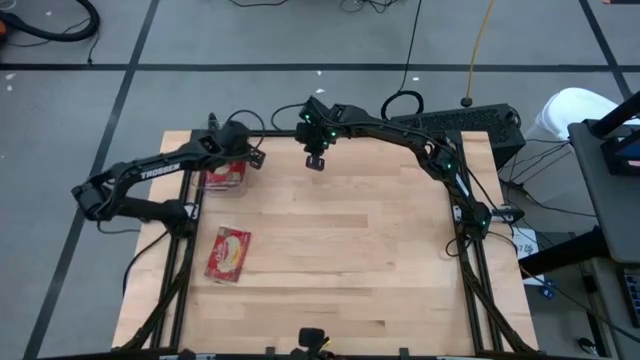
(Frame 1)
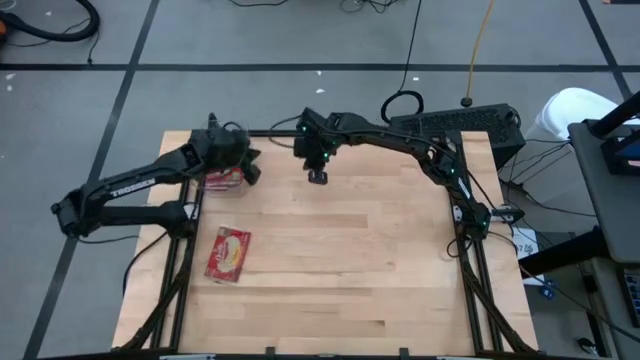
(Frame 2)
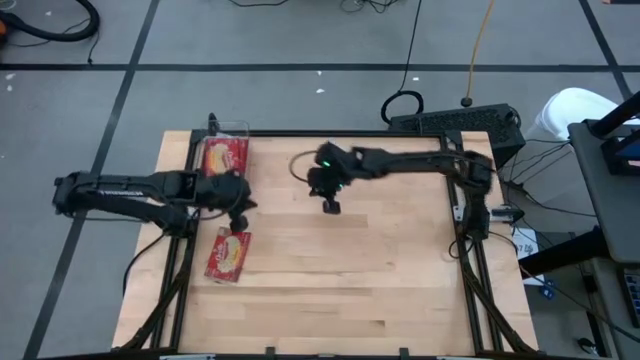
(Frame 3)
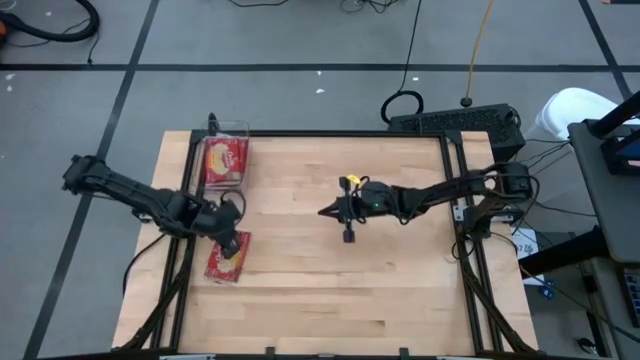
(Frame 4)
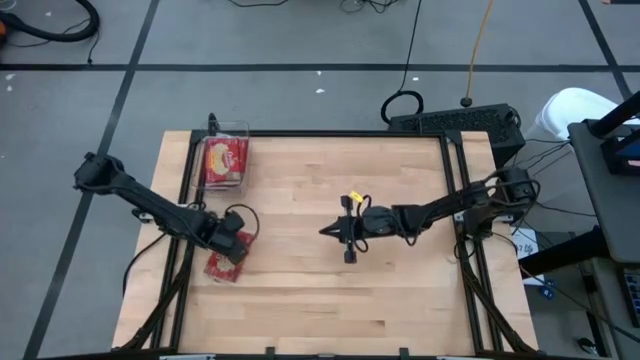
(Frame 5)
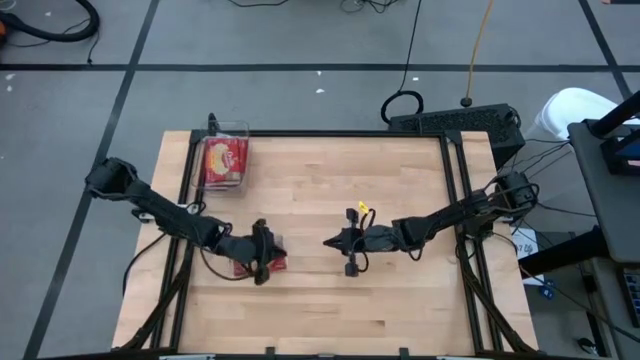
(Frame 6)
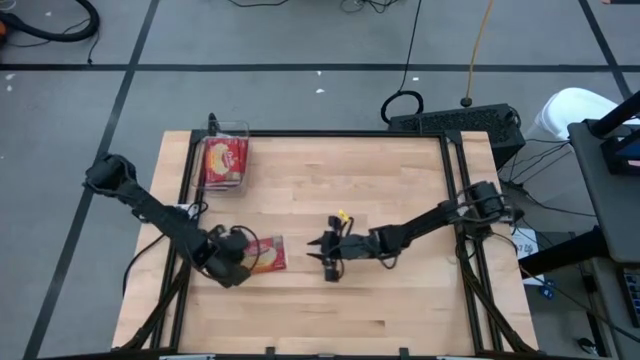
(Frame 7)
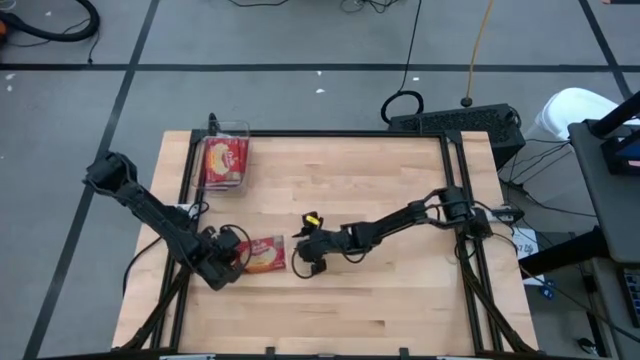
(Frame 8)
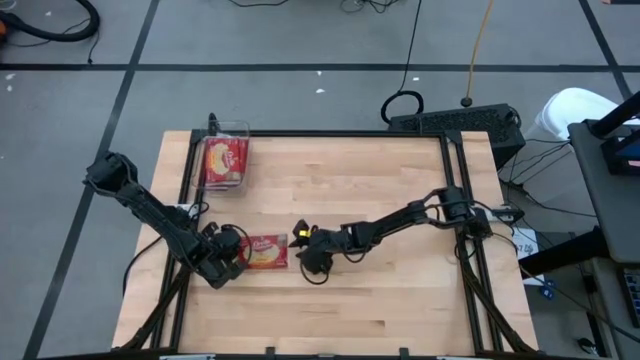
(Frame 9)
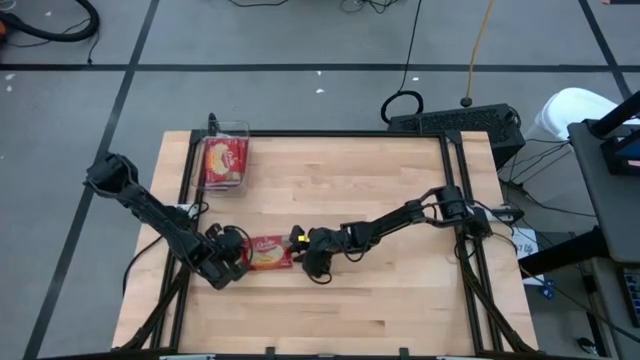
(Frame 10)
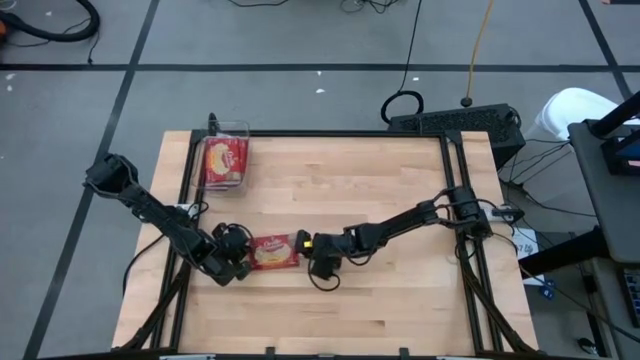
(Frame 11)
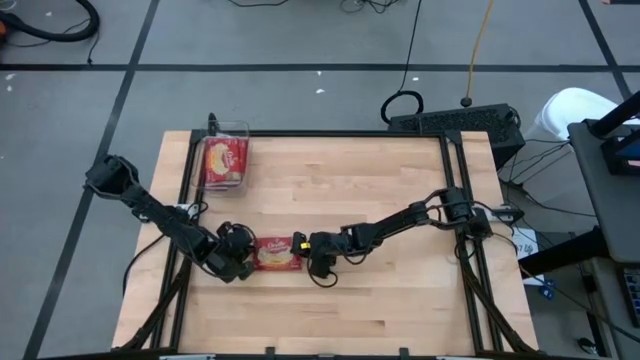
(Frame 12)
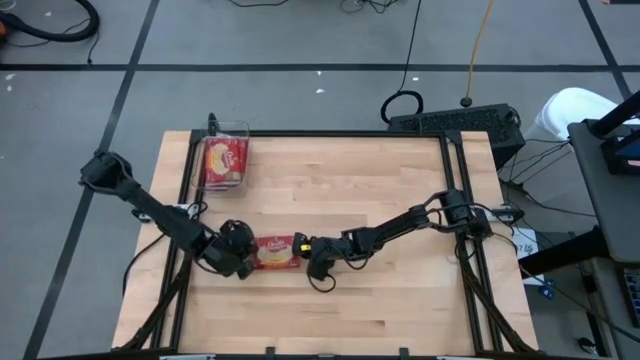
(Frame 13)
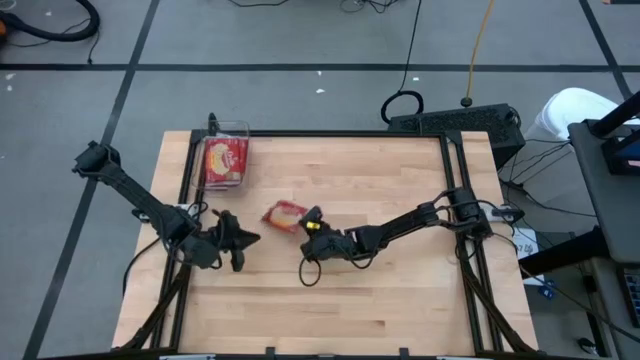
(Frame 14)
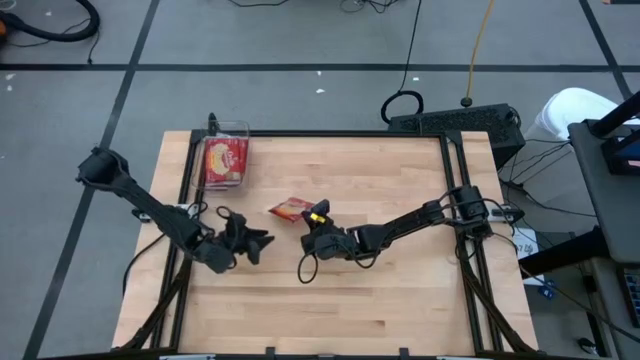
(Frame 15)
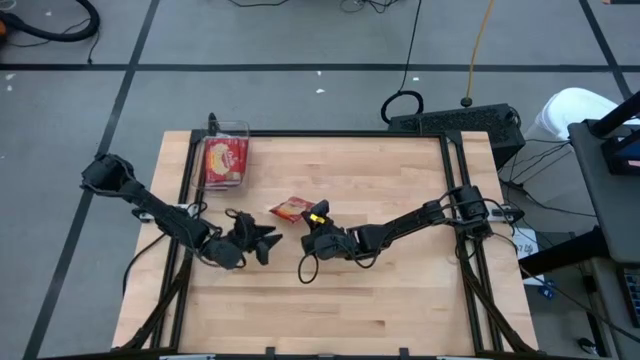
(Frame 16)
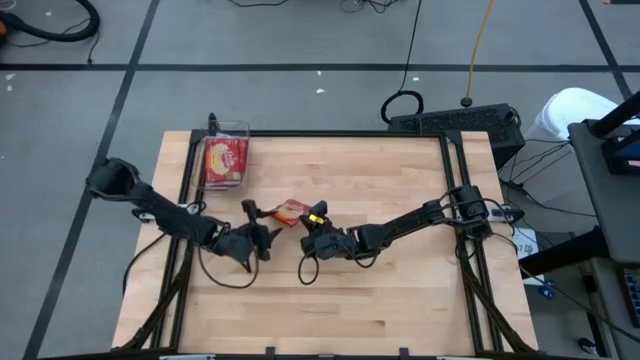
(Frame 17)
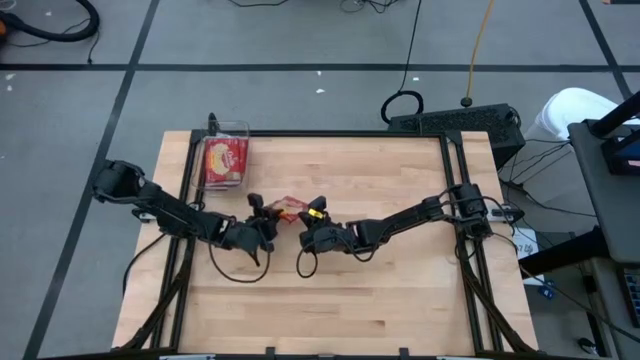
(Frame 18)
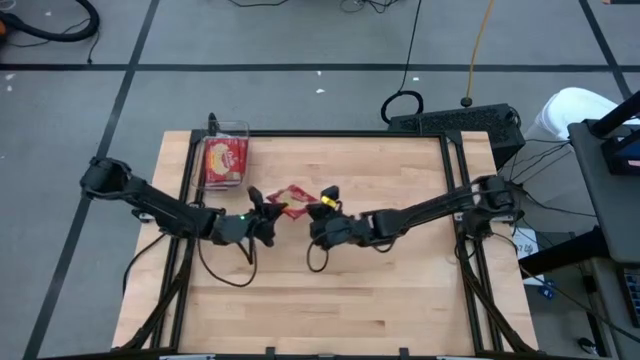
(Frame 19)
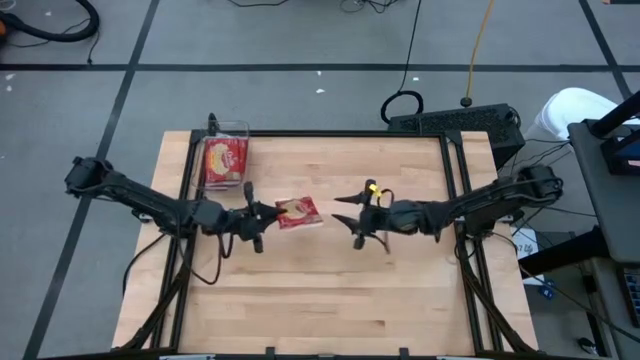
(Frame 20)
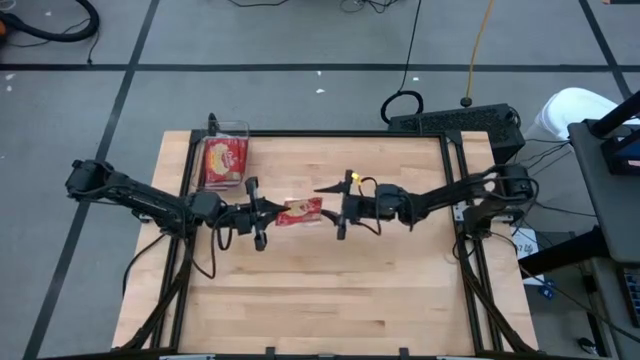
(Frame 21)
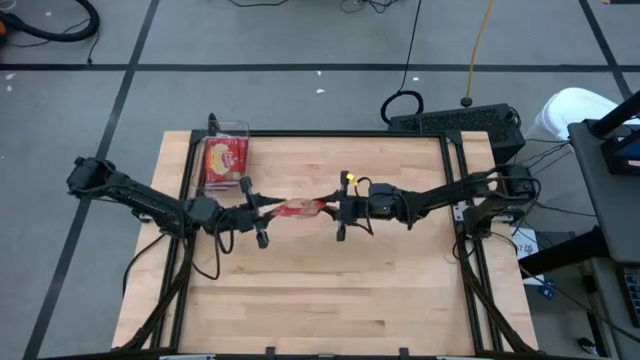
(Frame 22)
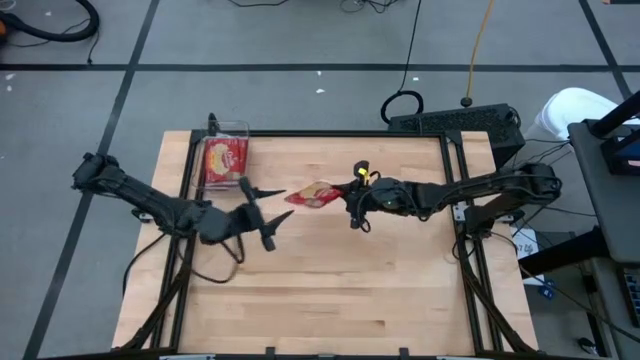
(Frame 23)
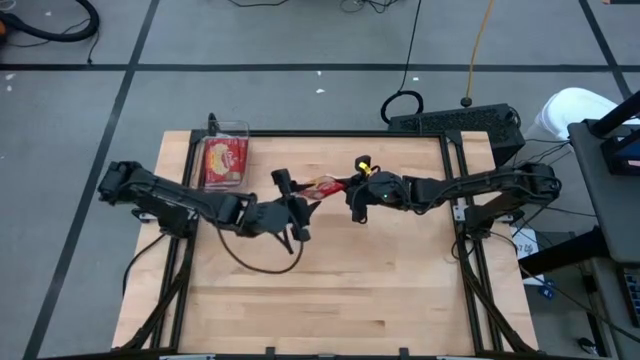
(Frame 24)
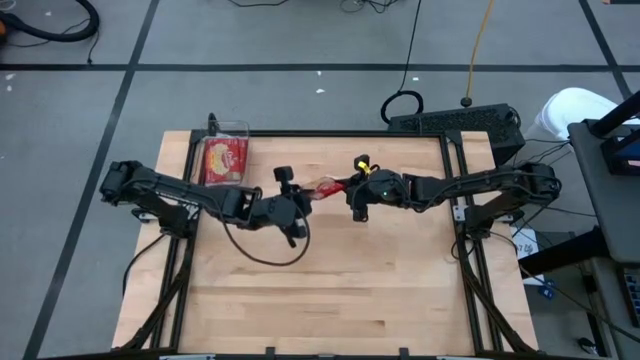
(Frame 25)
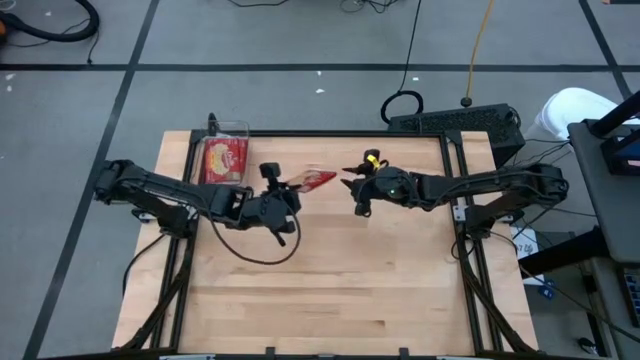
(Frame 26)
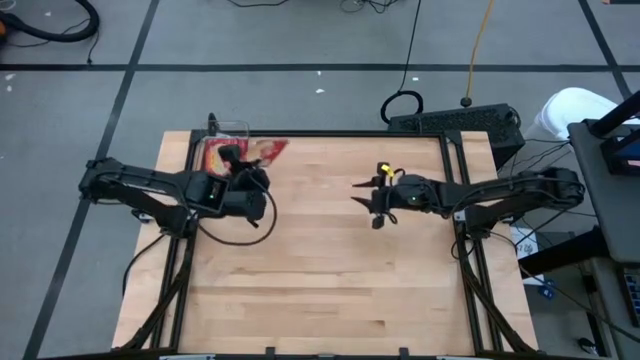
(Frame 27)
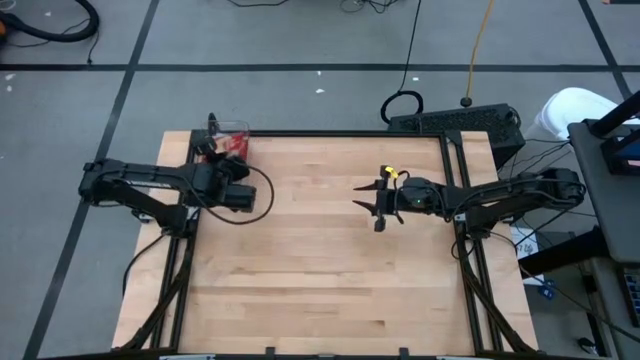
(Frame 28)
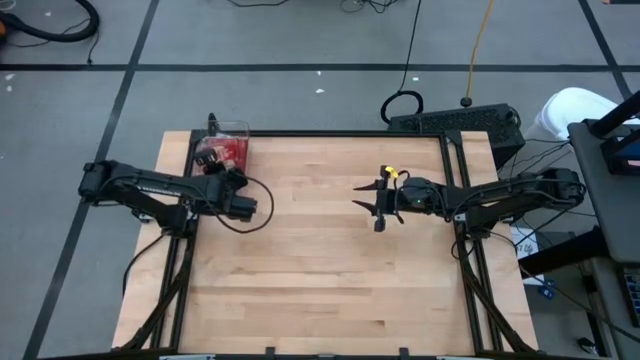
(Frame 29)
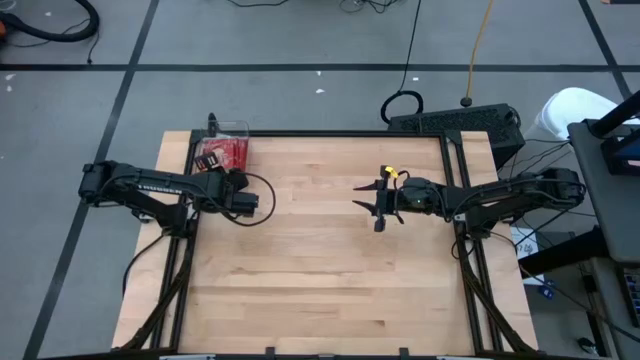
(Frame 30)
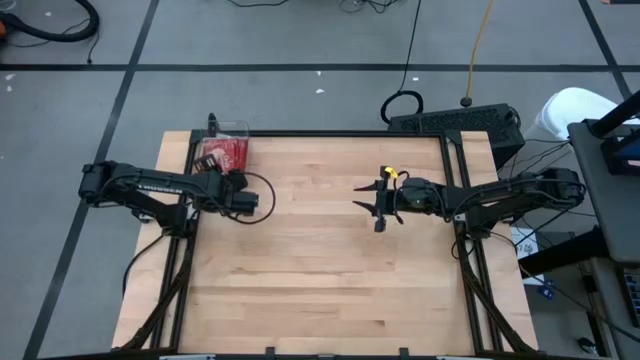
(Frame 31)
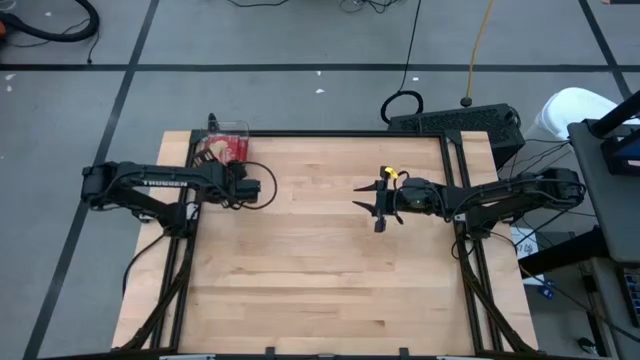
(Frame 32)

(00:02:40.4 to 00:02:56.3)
Task: Sort popcorn bags into baskets
Put the red popcorn bag into the transparent bin

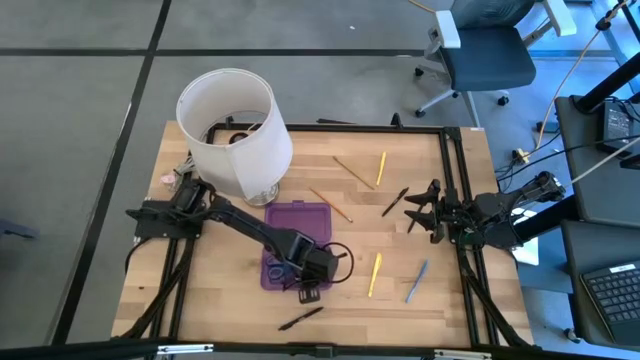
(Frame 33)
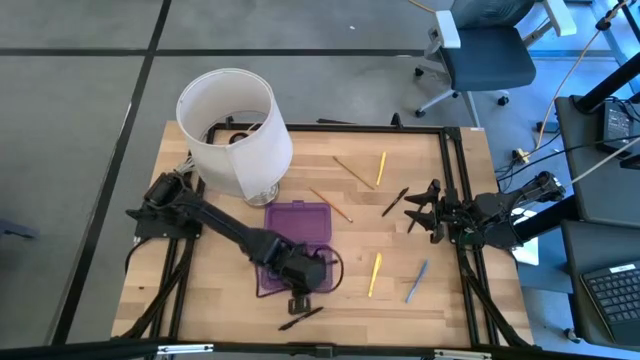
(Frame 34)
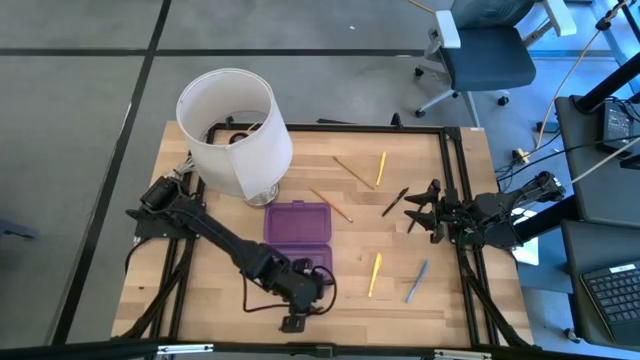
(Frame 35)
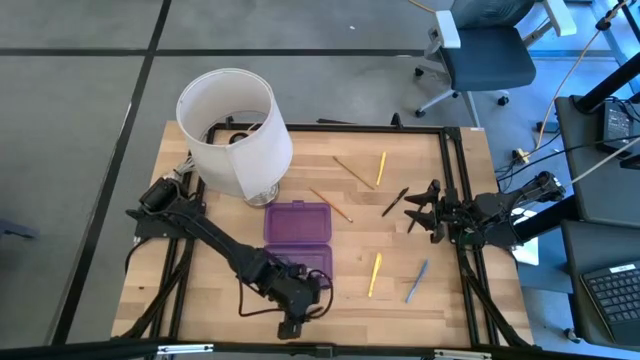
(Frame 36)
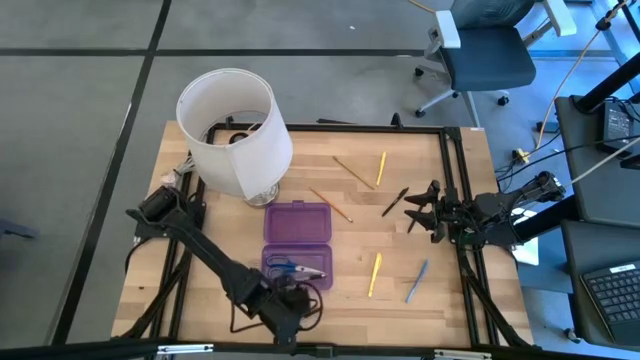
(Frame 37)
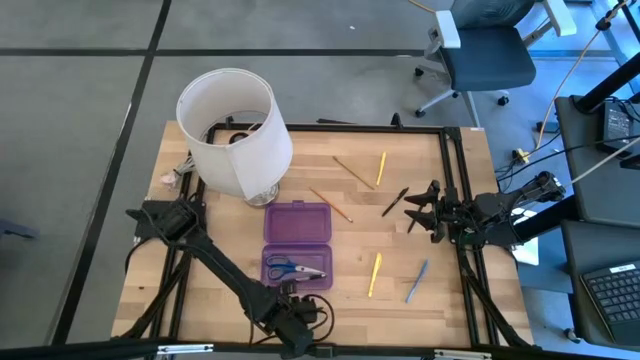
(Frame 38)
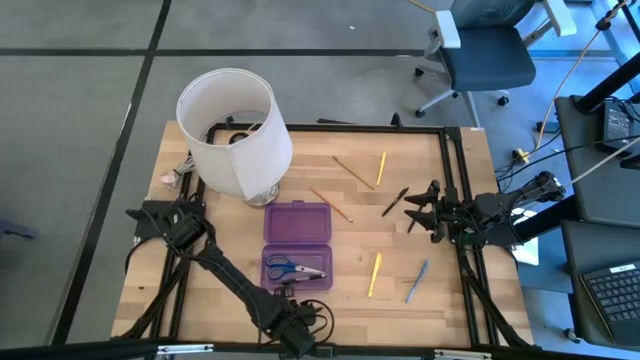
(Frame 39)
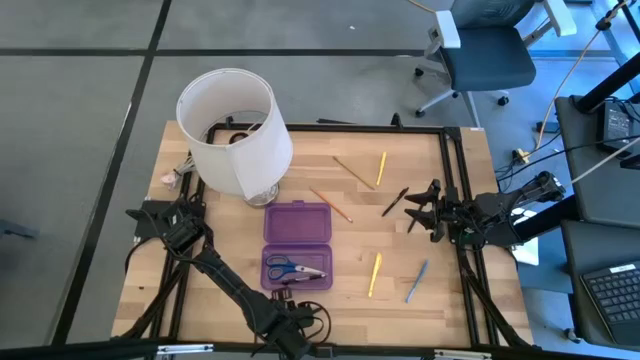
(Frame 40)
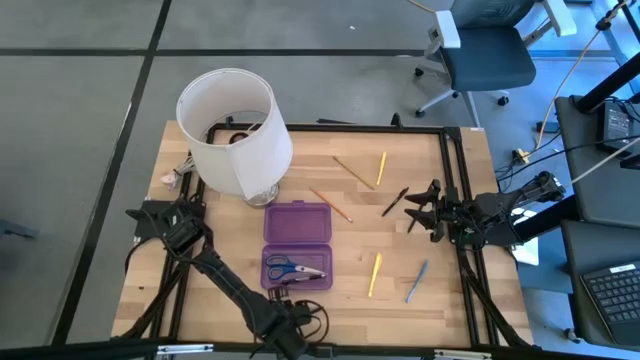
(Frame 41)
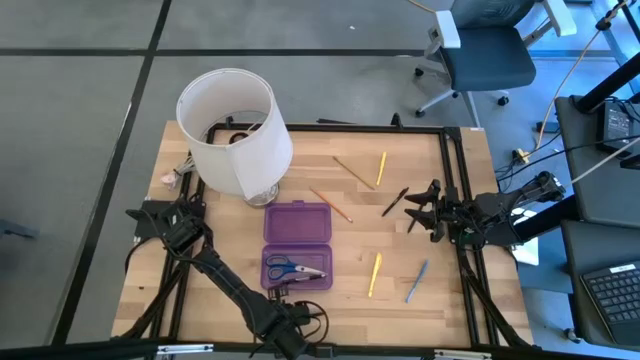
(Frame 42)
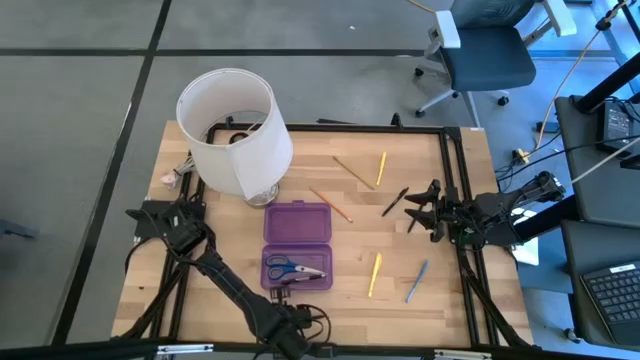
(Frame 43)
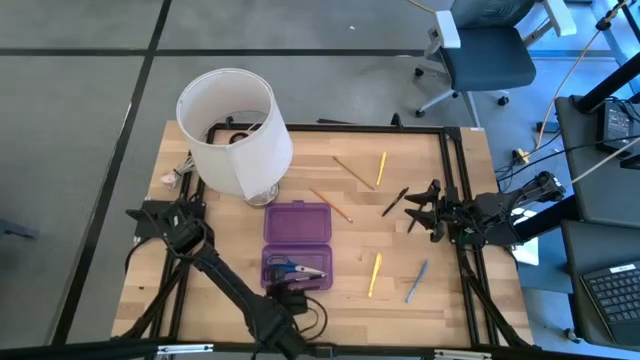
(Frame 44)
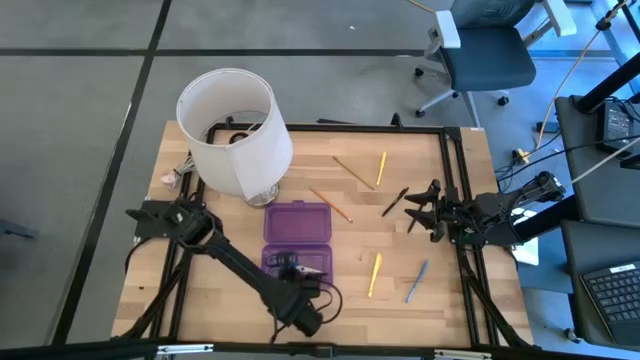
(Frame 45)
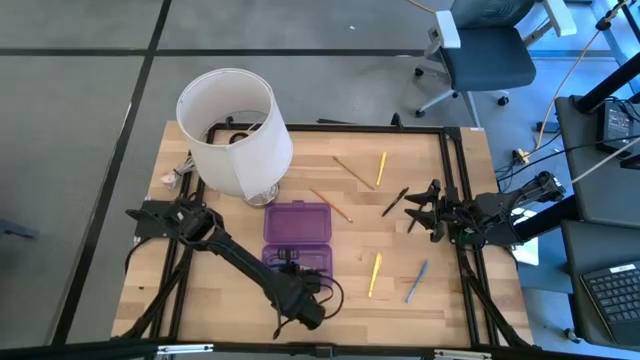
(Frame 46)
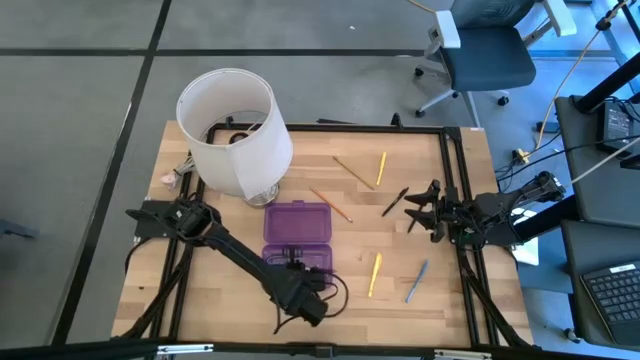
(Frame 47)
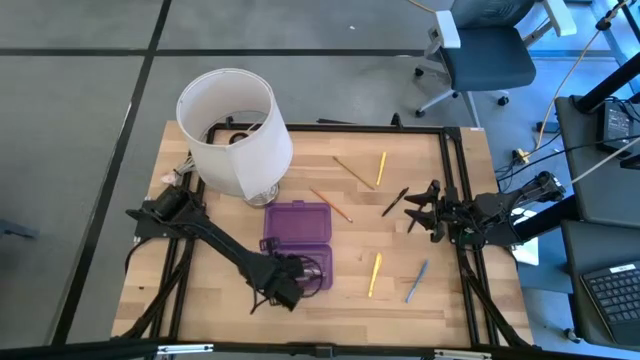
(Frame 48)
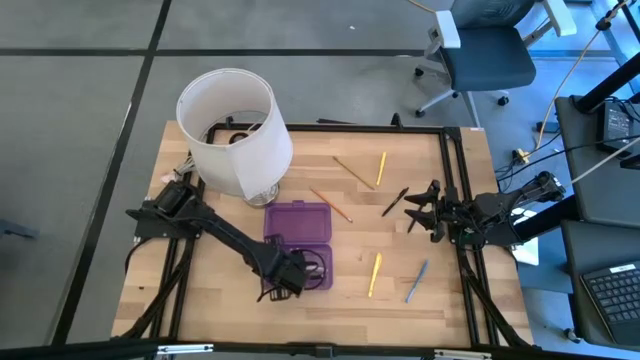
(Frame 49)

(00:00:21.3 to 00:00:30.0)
Task: Pick & place school supplies into a supply box
Put the black pen into the purple supply box
